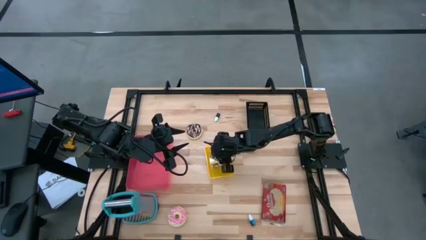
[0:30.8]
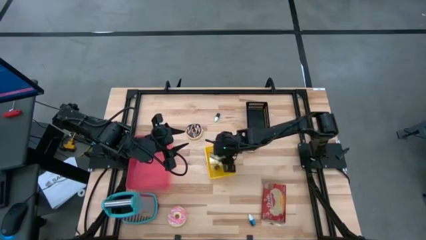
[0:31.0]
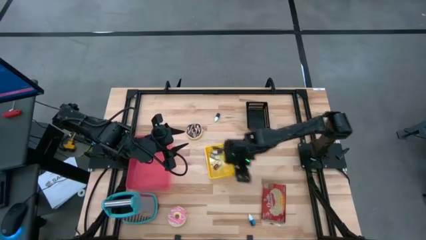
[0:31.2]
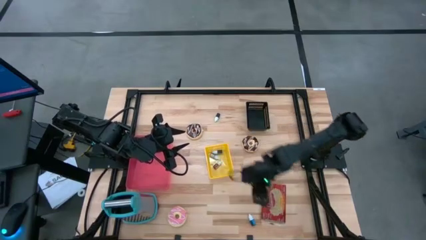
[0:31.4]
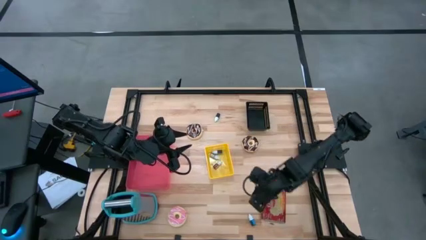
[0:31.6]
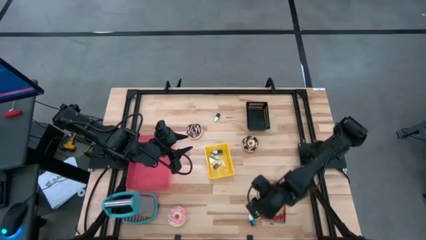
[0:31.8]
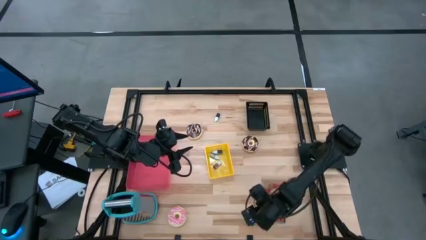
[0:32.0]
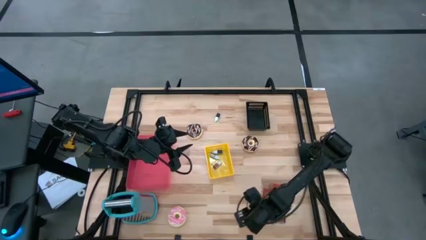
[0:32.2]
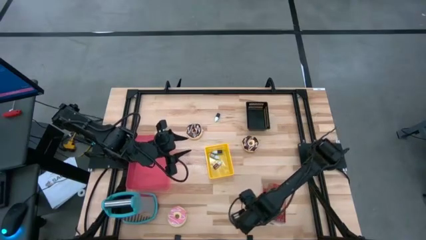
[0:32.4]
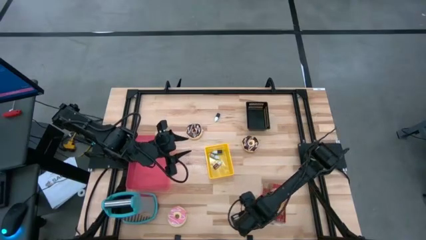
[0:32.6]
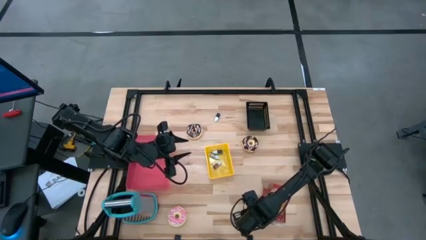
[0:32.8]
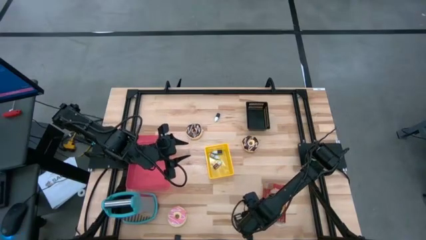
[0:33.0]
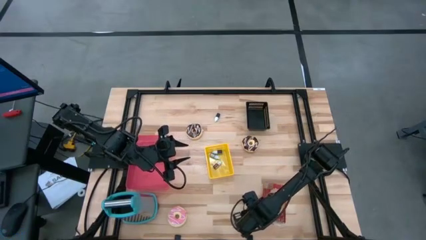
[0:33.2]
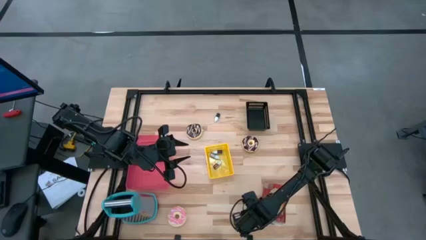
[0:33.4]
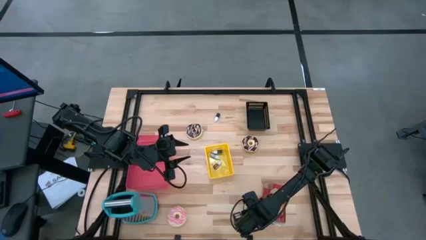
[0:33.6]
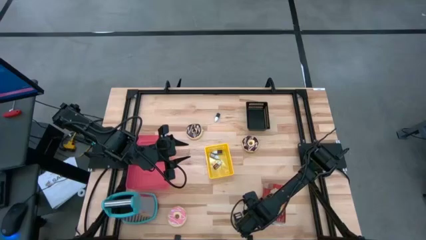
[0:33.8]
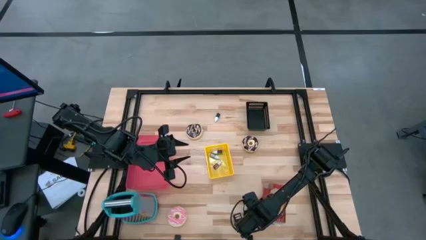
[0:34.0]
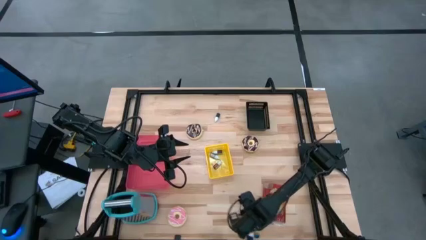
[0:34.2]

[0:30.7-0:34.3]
Put the blue food coloring bottle into the yellow bin

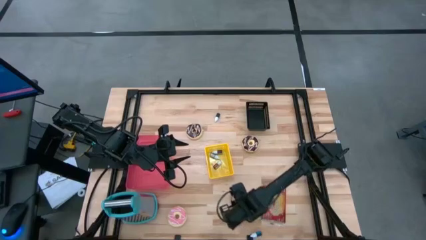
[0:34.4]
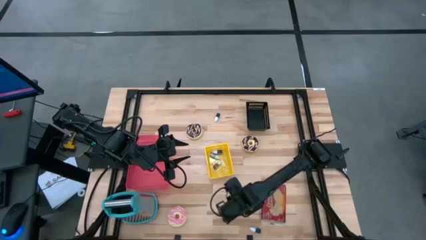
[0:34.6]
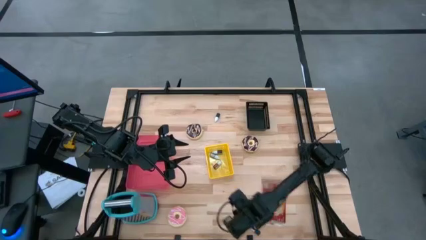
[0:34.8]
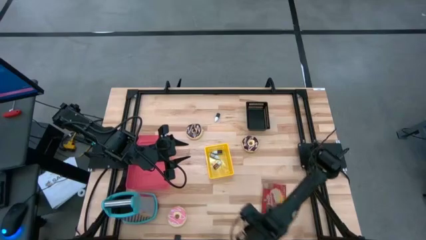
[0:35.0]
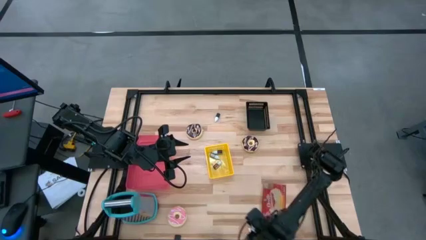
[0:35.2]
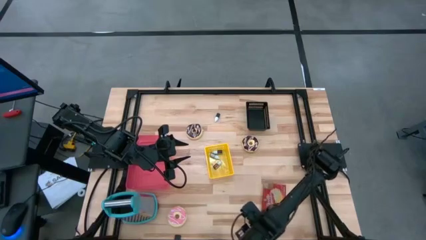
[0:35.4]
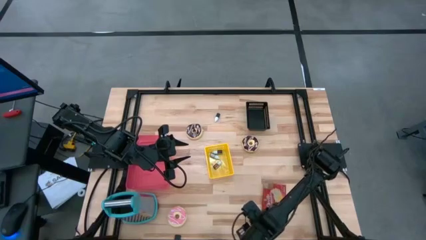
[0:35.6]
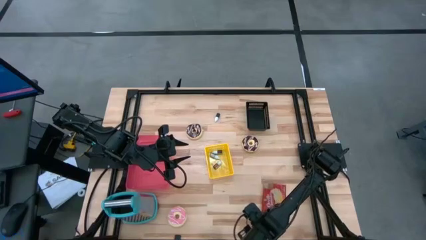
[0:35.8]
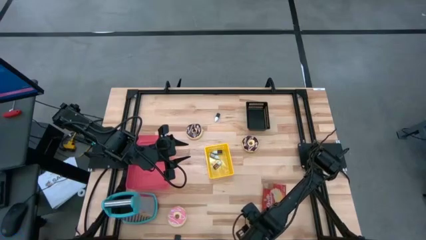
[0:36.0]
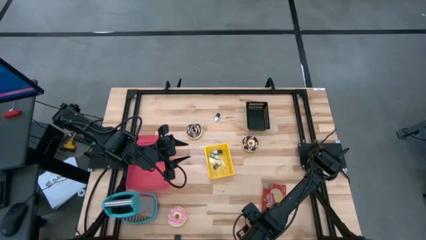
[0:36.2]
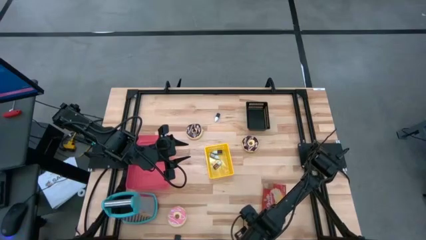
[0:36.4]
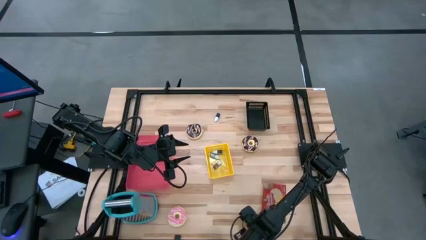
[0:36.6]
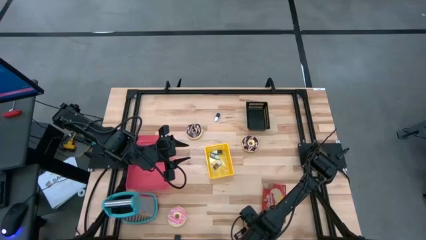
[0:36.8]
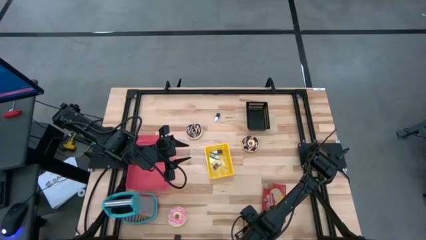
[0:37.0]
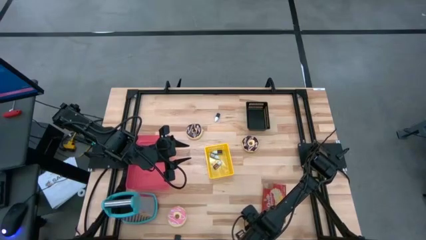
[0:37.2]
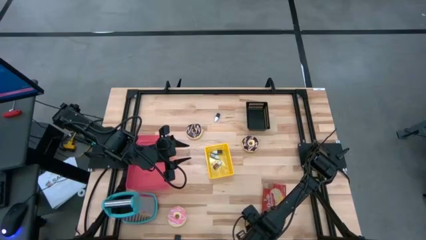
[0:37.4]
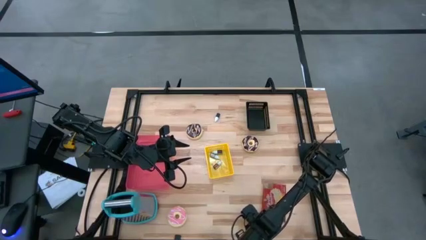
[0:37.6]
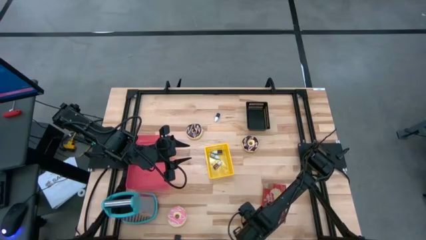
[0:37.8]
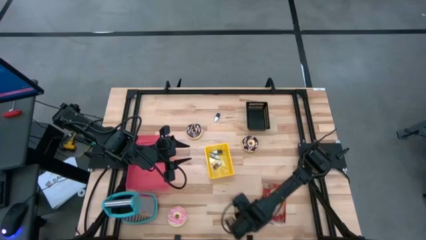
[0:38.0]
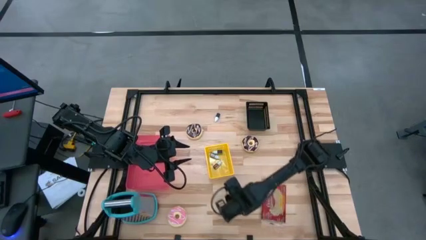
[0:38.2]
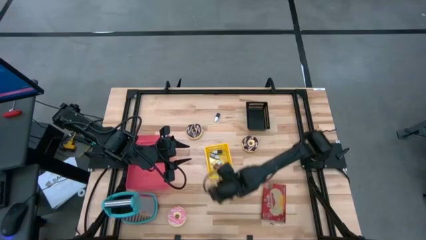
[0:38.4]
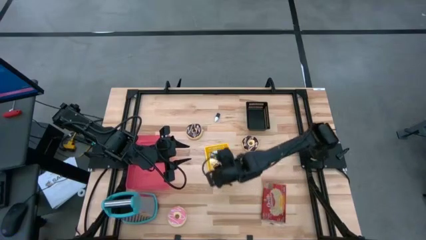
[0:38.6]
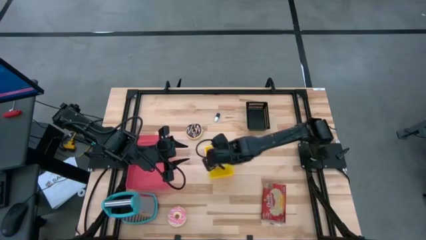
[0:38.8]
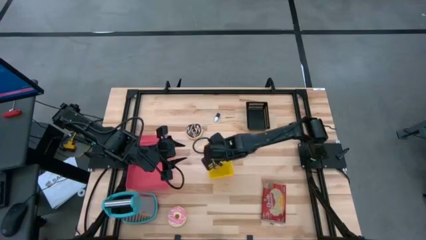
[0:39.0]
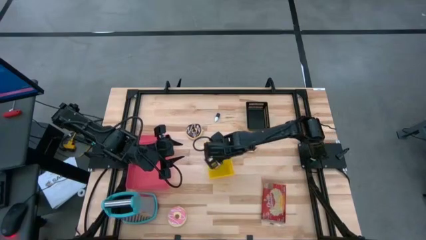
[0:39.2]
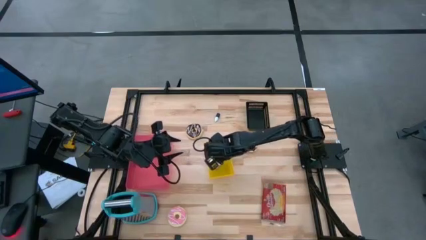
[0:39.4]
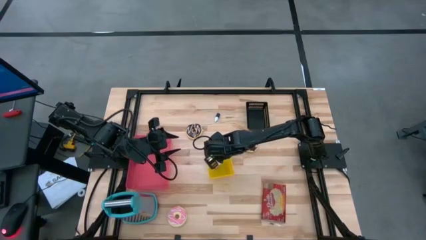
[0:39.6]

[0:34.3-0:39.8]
Put the blue food coloring bottle into the yellow bin

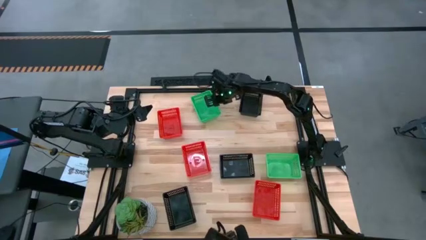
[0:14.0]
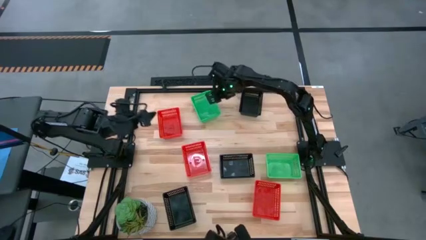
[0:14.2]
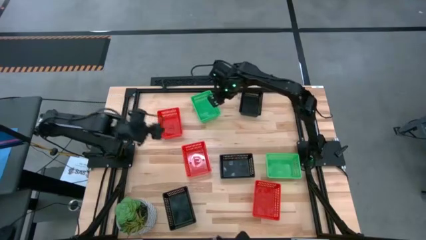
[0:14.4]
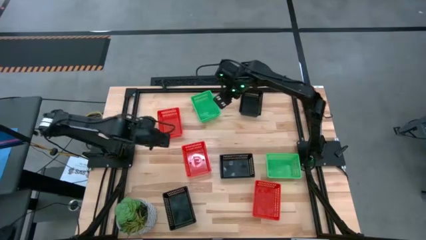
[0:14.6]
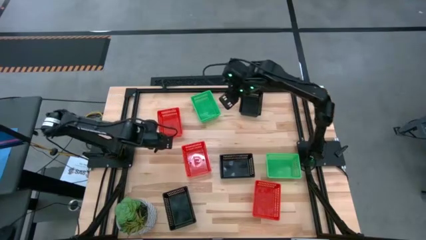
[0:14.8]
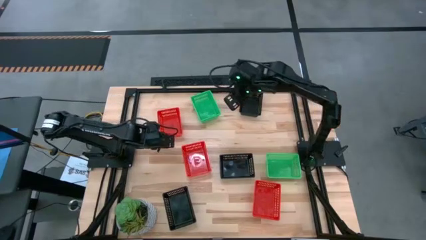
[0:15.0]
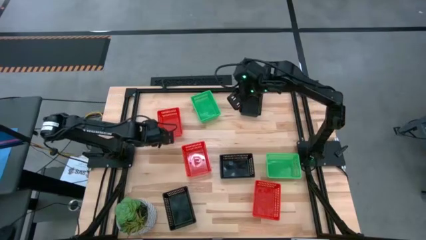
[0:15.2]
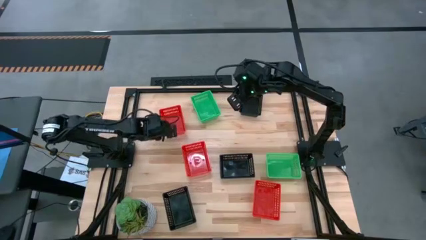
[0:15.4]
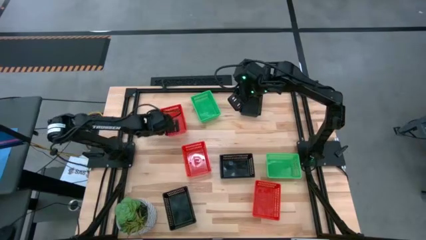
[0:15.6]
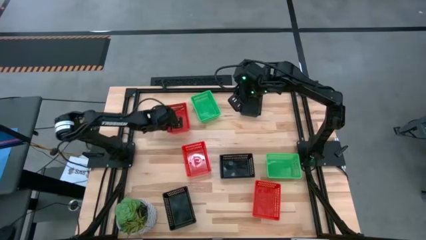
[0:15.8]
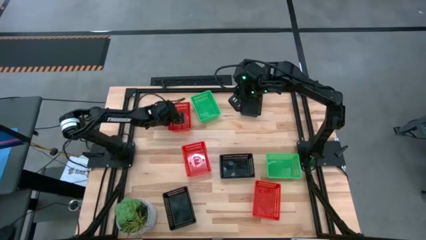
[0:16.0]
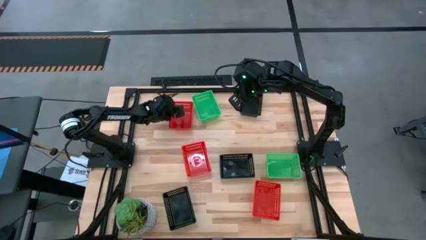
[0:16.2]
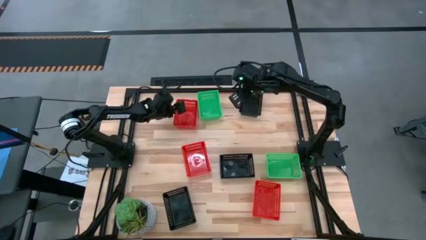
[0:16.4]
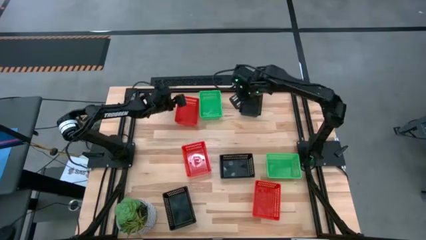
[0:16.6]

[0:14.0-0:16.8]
Adjust the top red bin

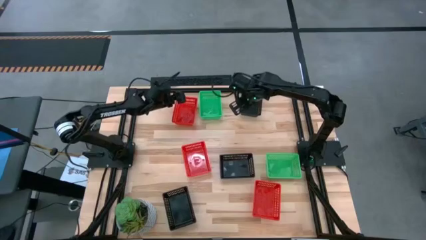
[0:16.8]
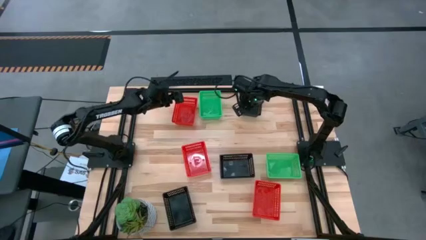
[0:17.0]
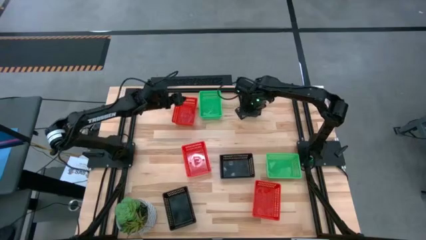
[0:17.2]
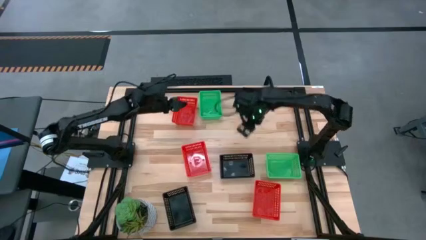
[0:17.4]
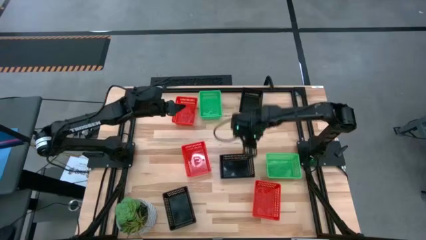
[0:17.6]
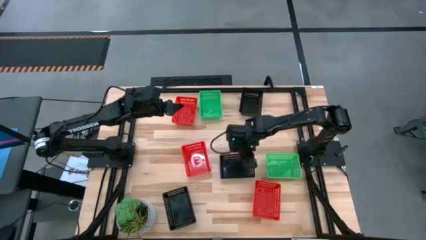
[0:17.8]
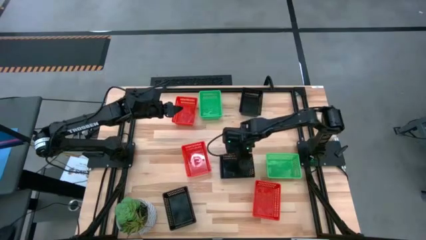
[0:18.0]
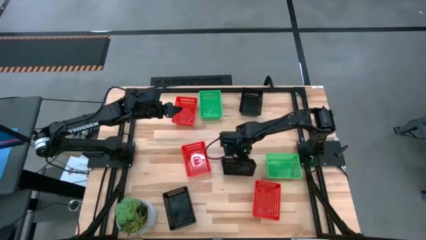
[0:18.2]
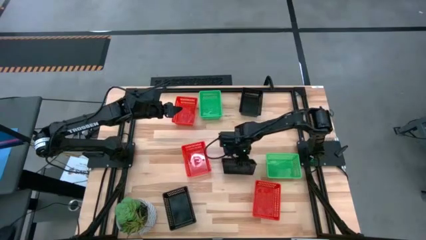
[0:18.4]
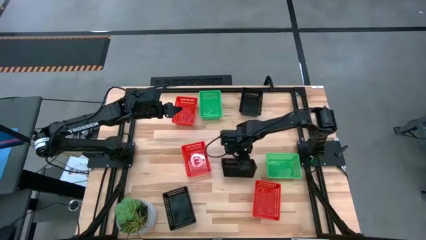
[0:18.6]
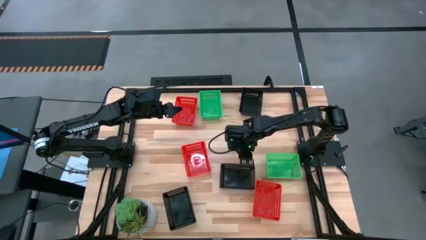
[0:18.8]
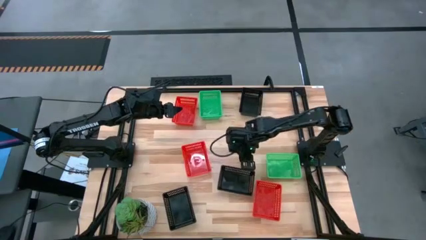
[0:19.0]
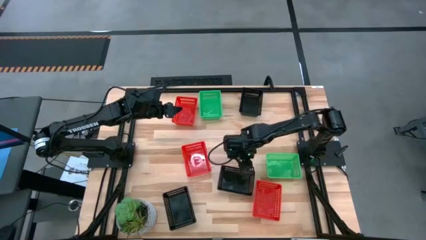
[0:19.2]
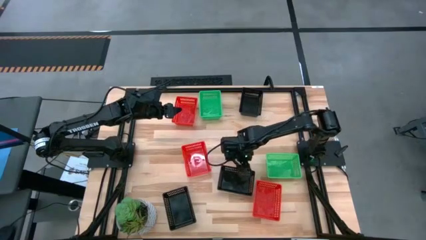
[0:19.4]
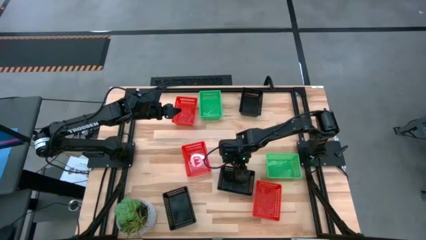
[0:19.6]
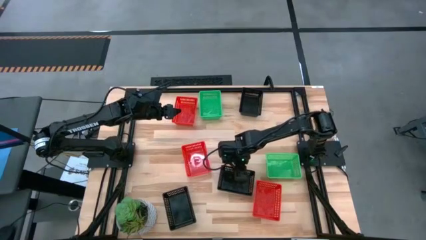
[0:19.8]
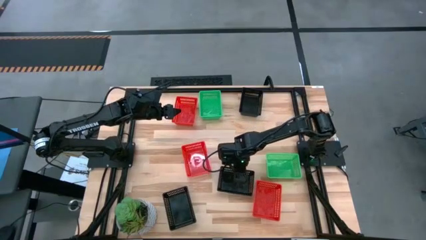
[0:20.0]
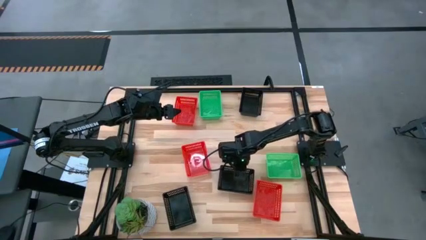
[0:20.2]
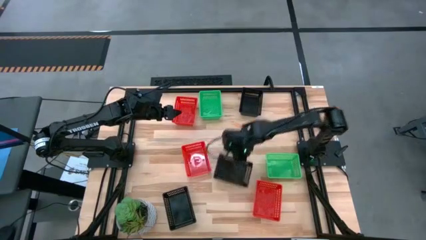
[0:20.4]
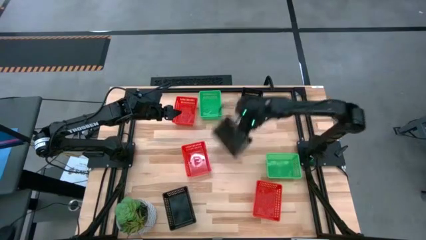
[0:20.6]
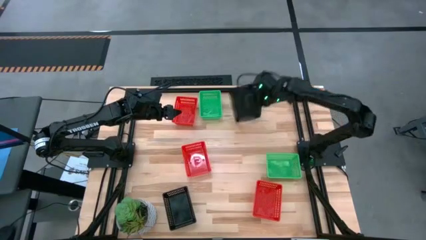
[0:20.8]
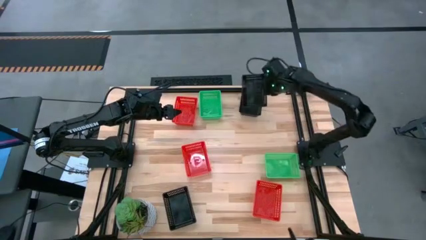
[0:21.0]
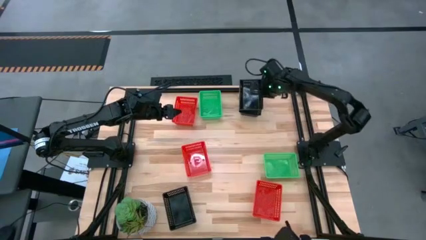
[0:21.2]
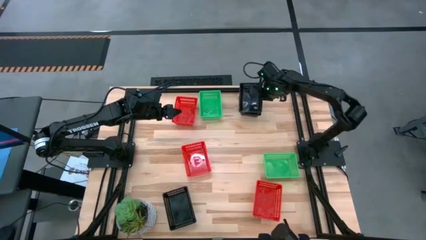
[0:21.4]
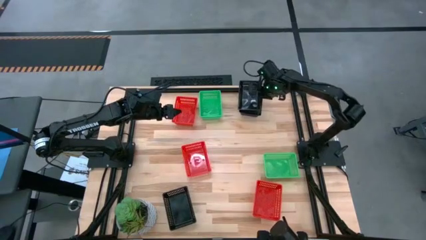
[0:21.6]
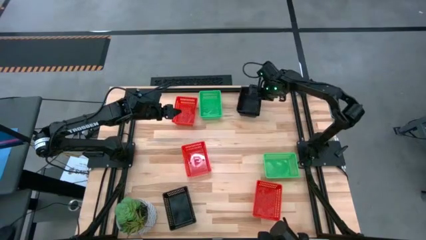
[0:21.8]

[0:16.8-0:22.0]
Stack the middle black bin on top of the top black bin
